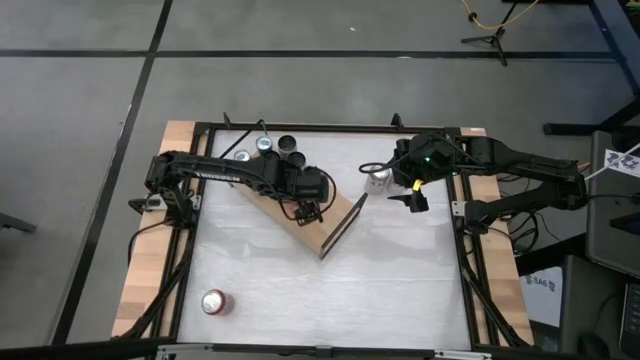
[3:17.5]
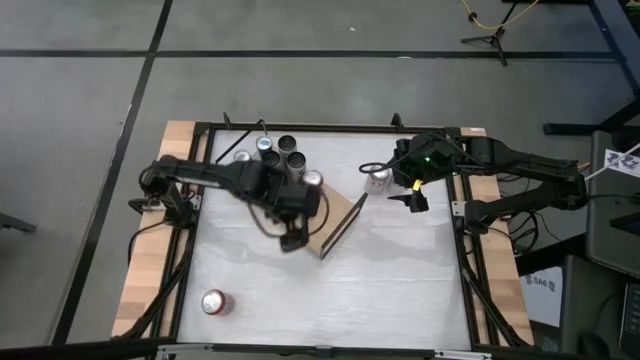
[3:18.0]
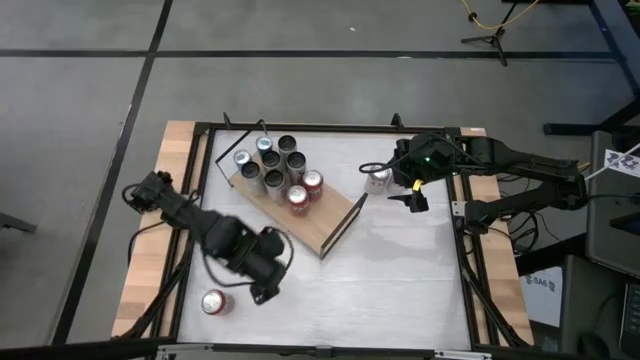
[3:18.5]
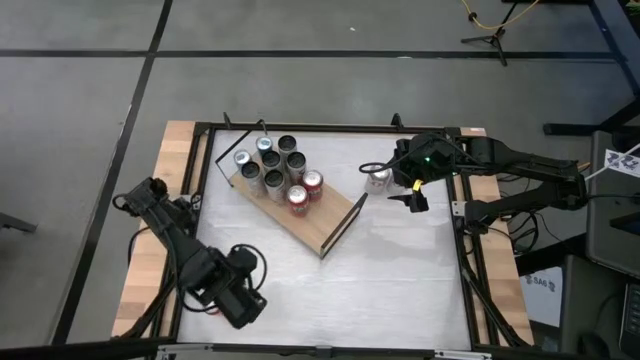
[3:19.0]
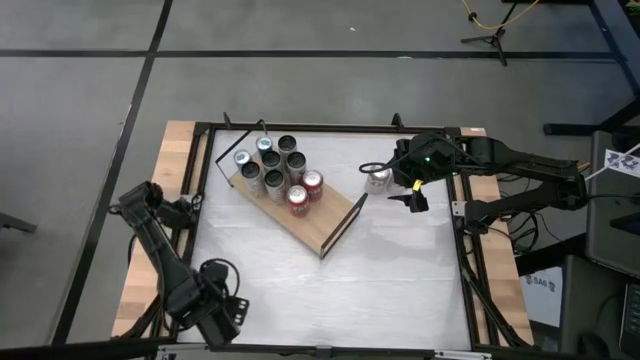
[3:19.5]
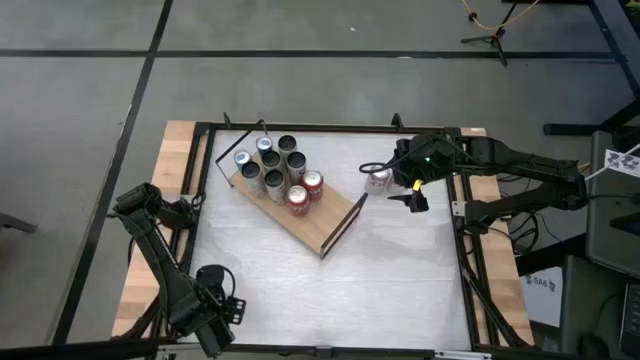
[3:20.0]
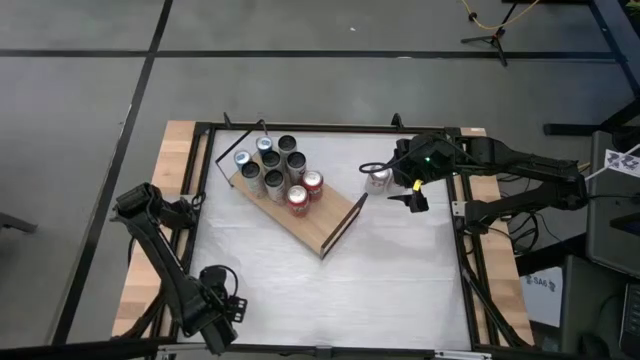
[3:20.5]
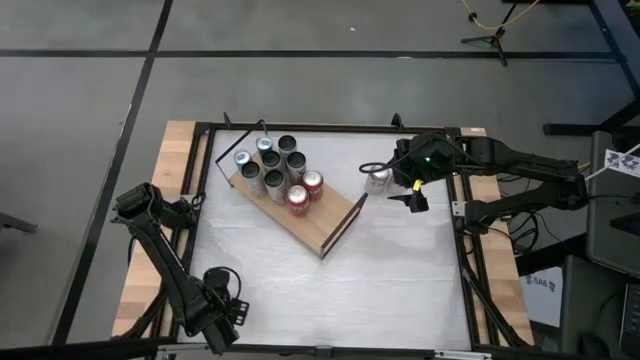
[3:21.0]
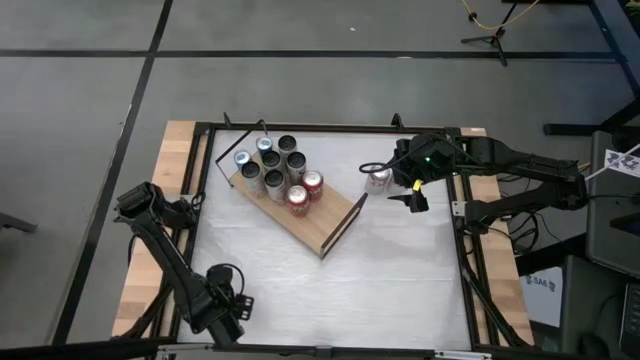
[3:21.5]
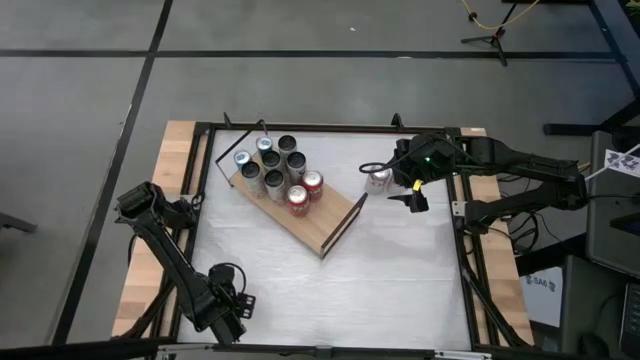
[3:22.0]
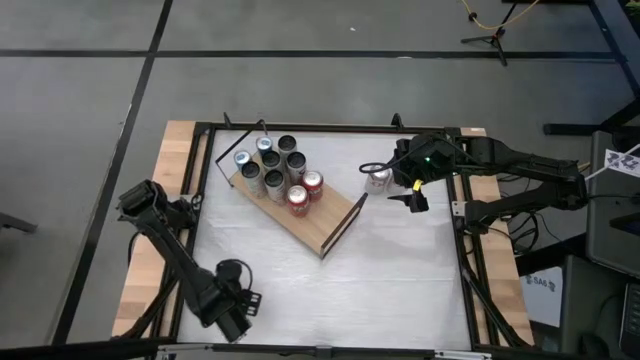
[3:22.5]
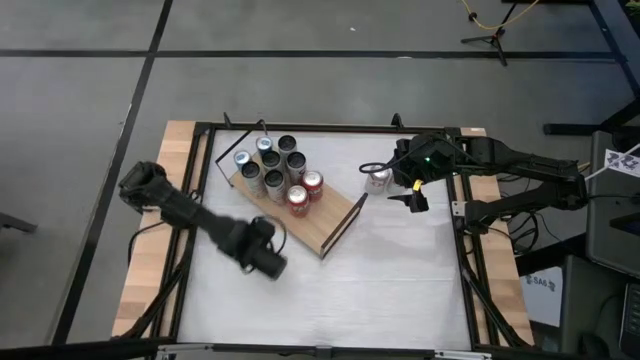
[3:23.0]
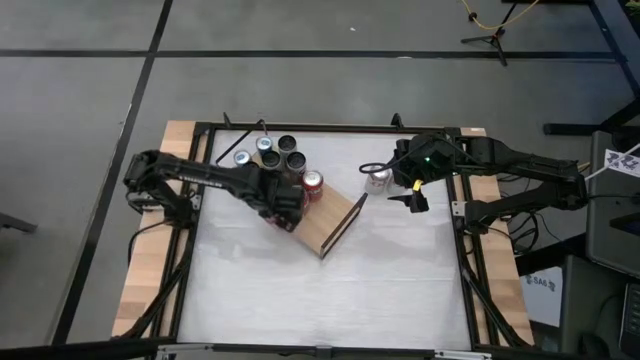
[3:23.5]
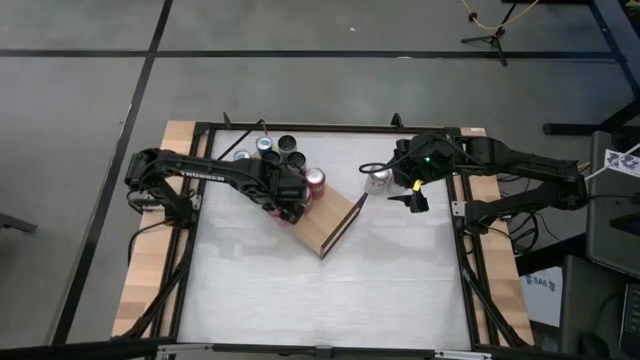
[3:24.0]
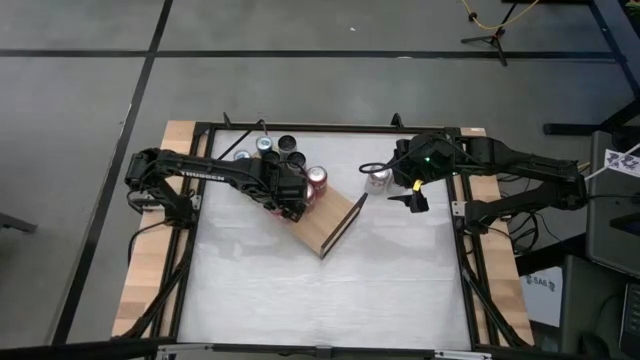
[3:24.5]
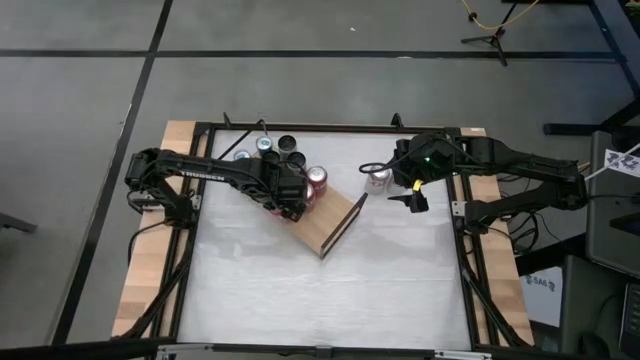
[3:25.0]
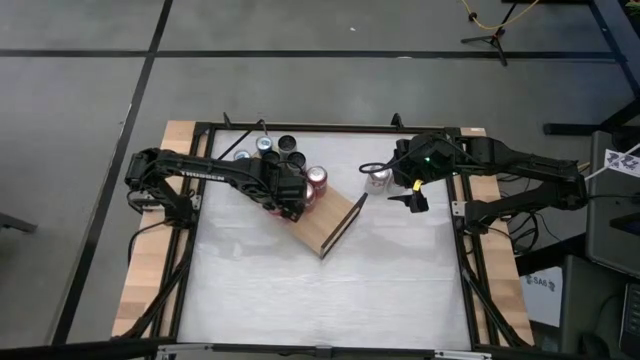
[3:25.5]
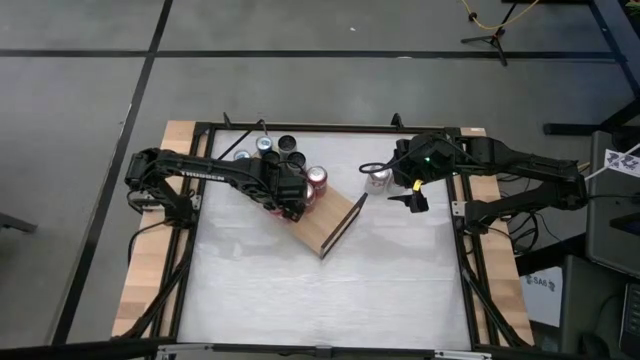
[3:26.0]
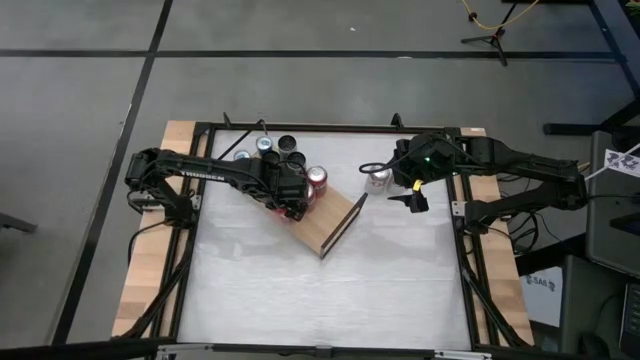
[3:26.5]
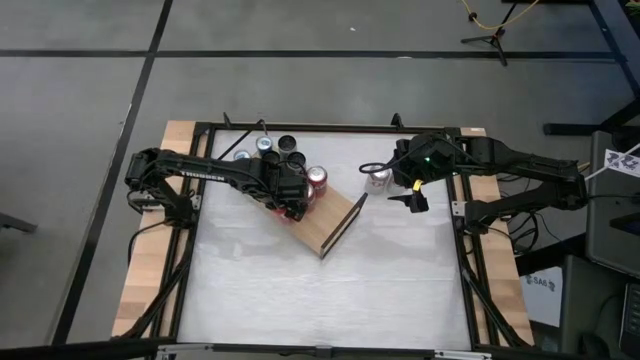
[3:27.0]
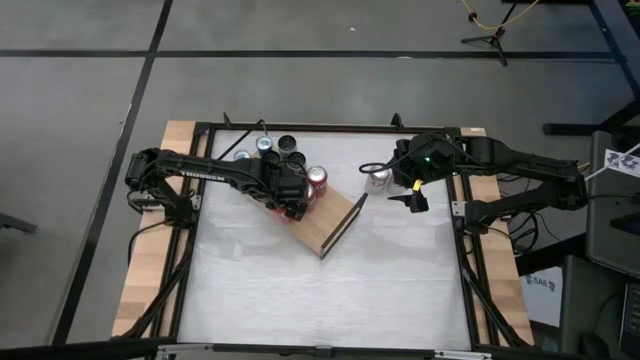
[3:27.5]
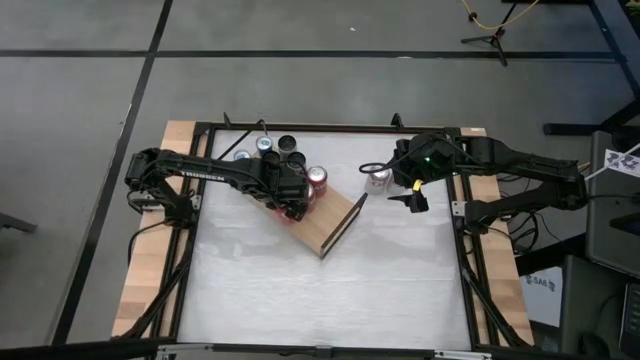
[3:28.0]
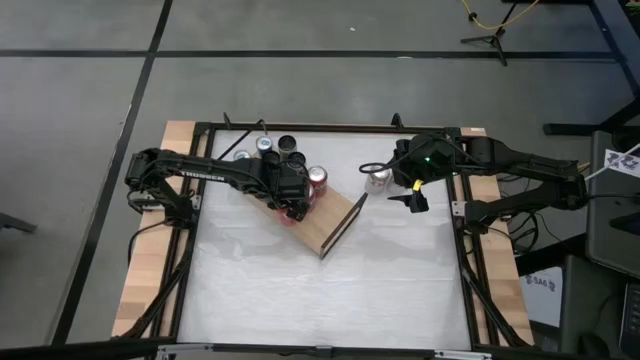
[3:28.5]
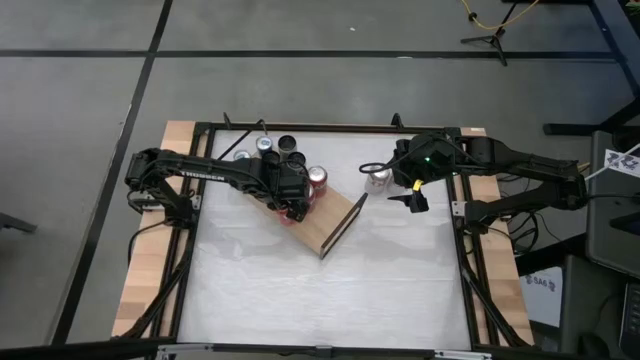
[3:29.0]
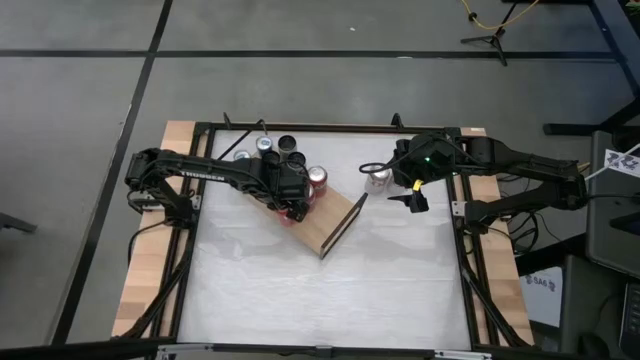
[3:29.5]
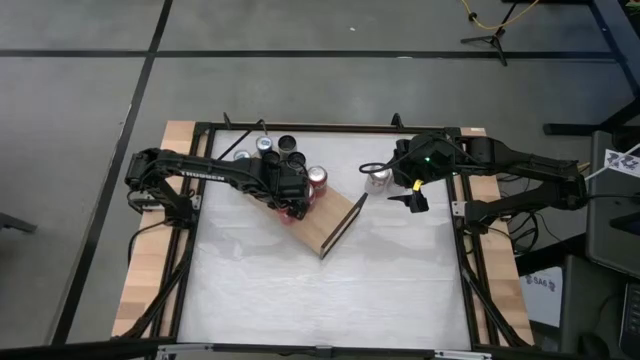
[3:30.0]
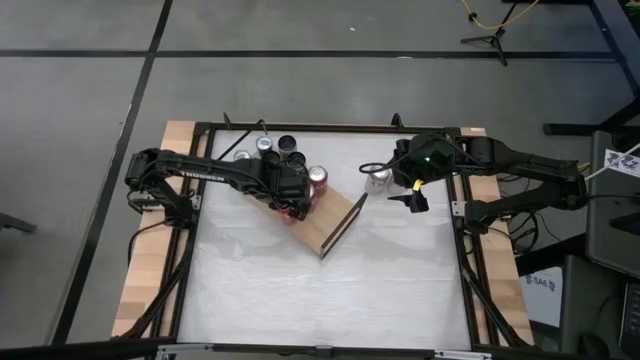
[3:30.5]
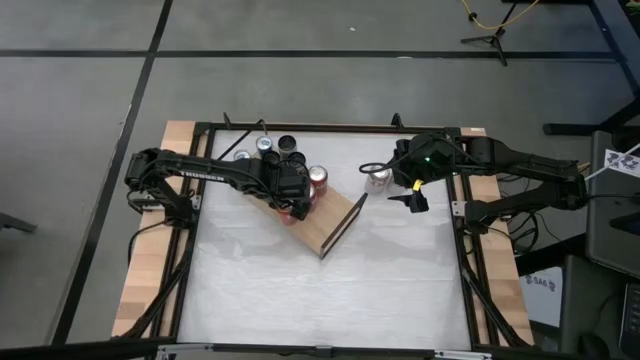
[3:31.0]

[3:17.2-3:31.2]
Task: Place canned beverage on shelf
Put the red soda can aligned with the other red soda can on the shelf

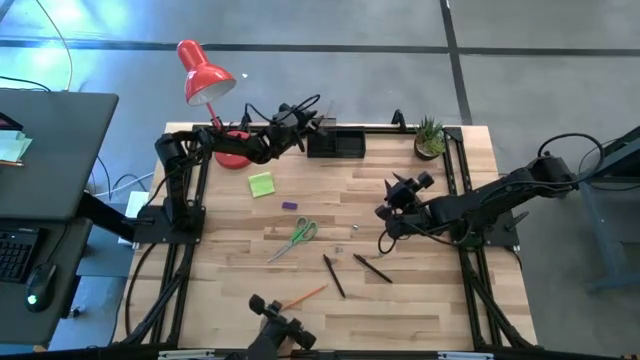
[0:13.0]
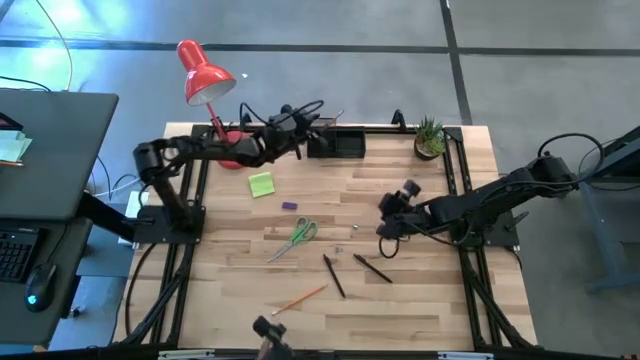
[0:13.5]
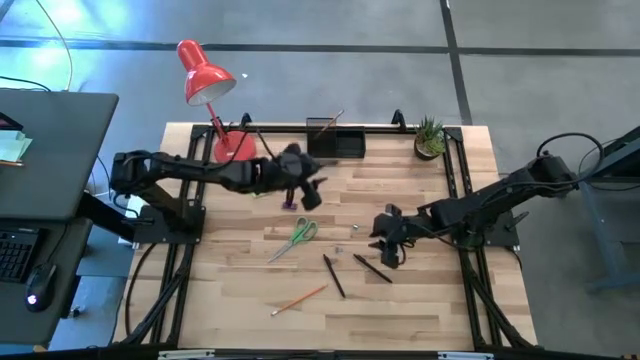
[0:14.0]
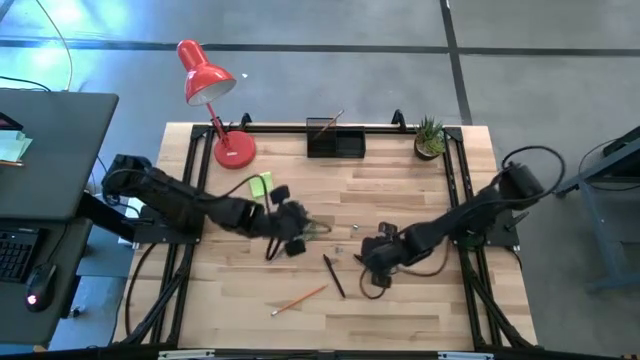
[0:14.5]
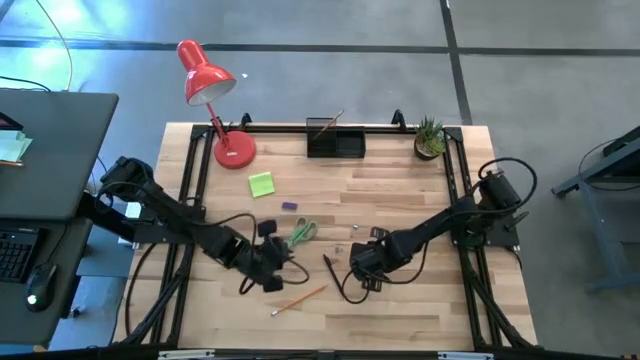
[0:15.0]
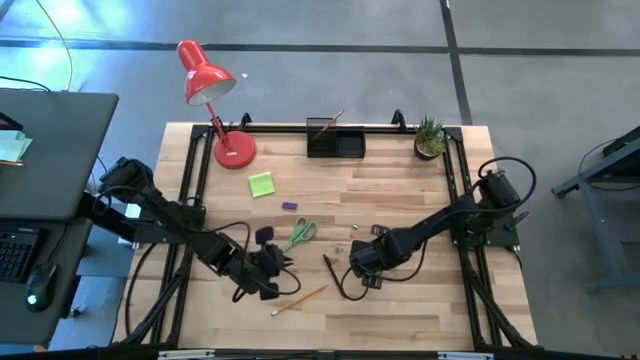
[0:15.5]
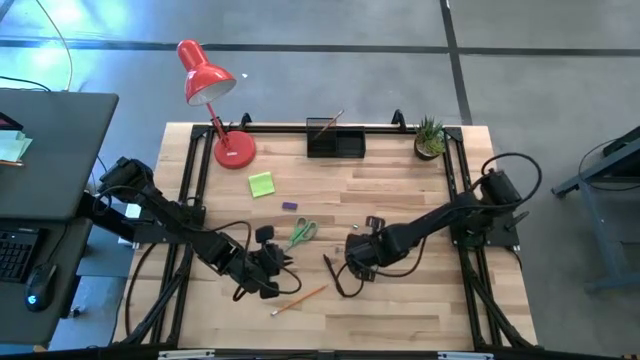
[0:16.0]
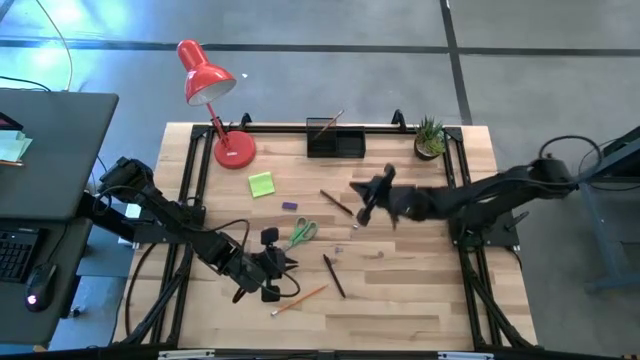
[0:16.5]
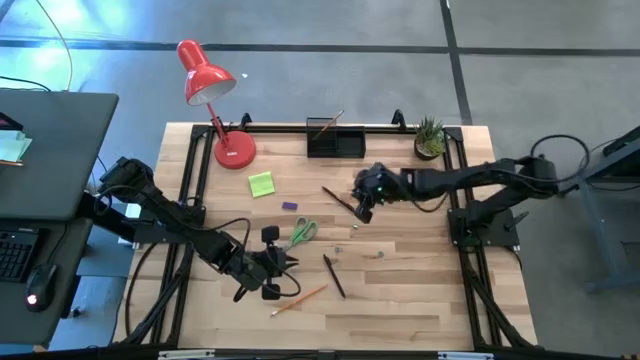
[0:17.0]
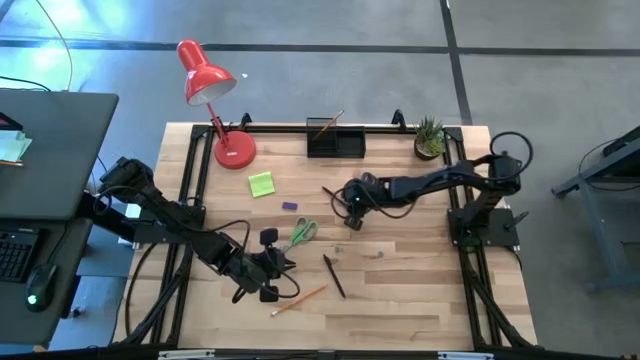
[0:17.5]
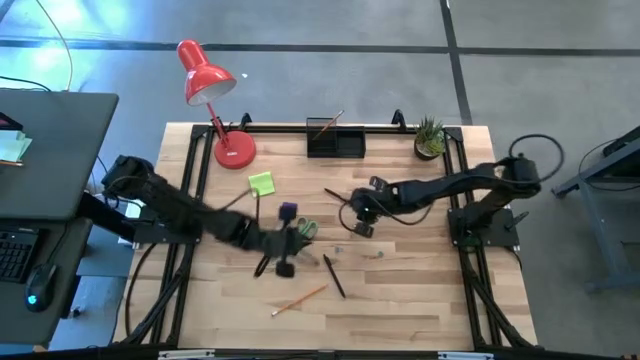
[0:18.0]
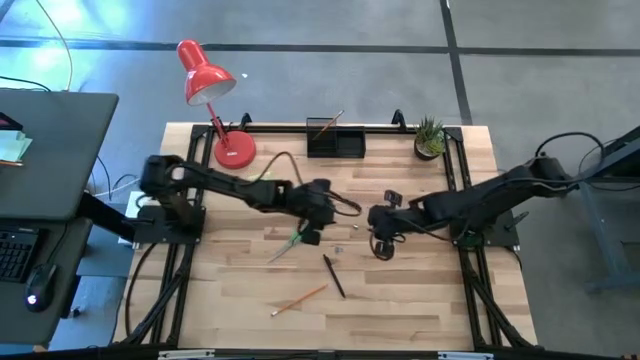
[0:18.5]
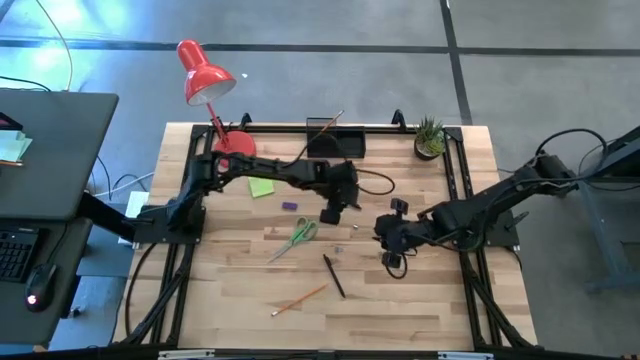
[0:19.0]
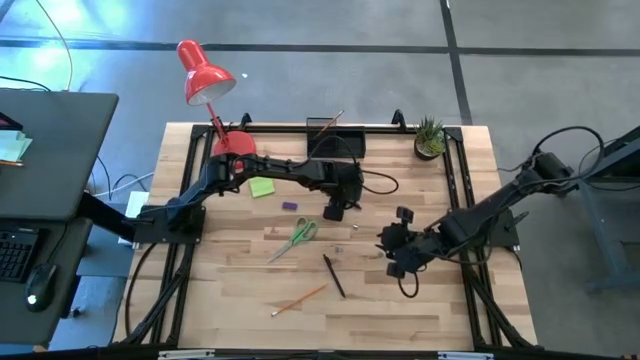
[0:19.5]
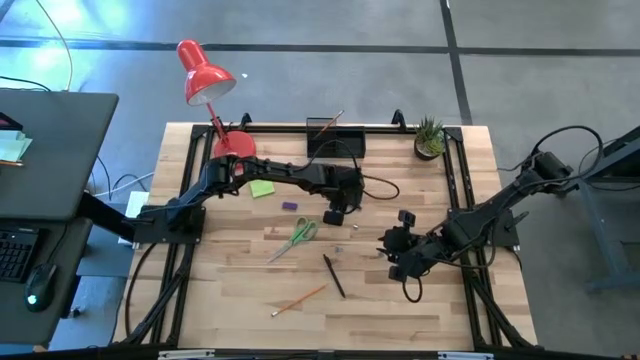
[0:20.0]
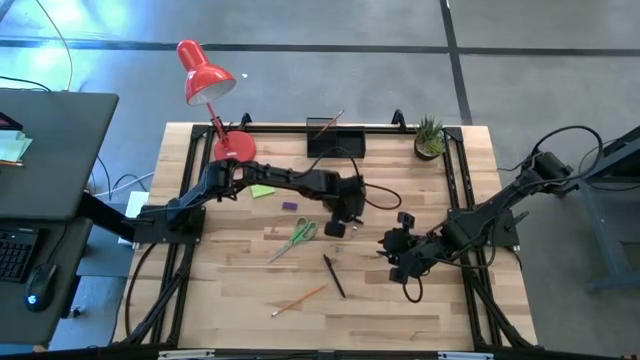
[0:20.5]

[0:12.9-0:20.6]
Task: Pick and place office supplies into organizer
Put the right black pen into the desk organizer
